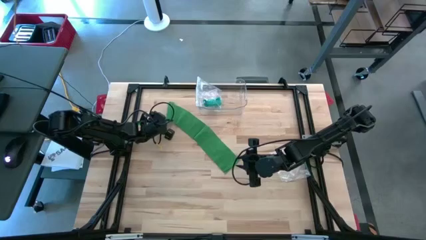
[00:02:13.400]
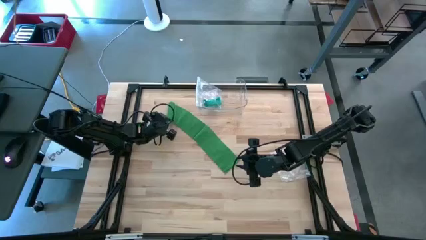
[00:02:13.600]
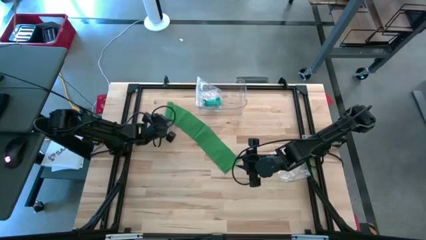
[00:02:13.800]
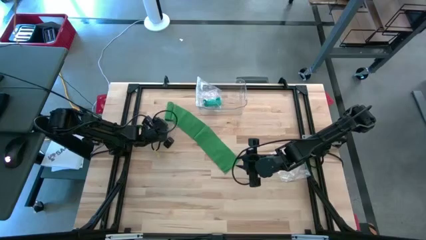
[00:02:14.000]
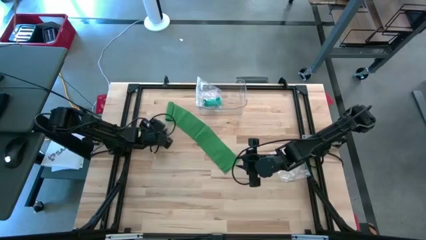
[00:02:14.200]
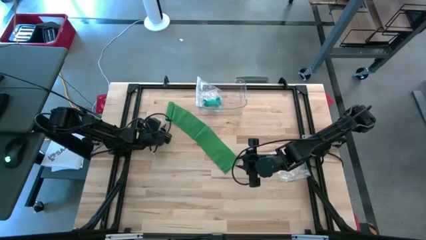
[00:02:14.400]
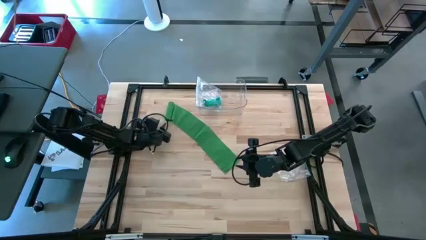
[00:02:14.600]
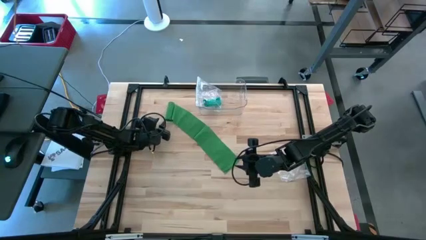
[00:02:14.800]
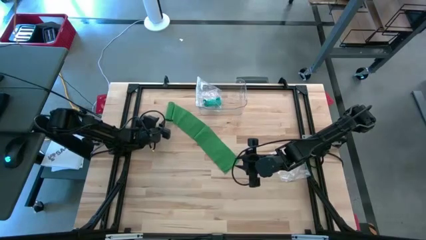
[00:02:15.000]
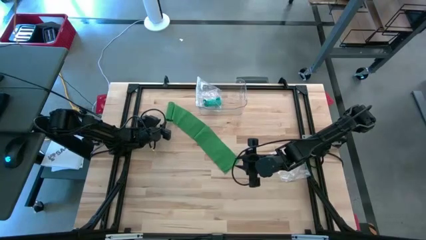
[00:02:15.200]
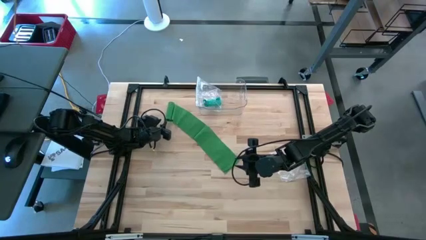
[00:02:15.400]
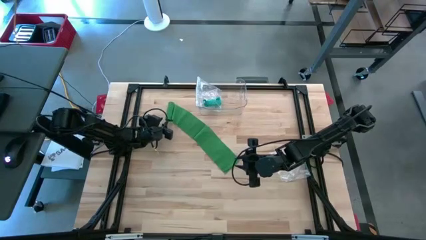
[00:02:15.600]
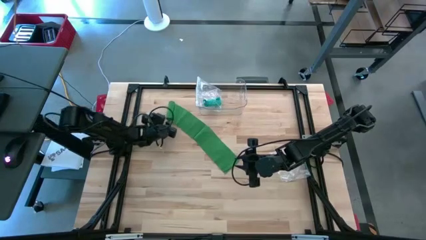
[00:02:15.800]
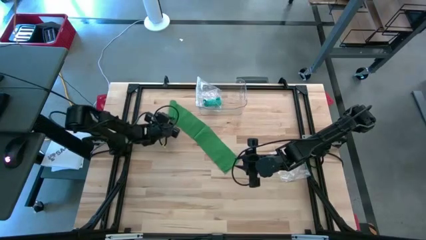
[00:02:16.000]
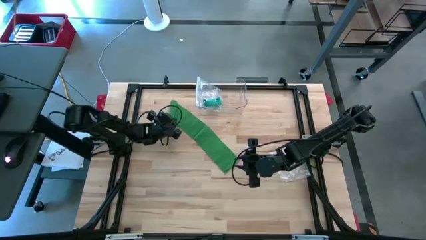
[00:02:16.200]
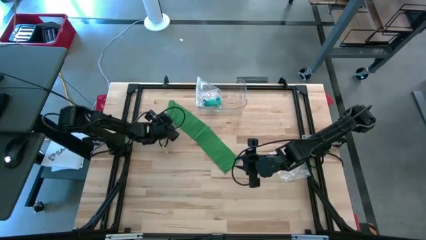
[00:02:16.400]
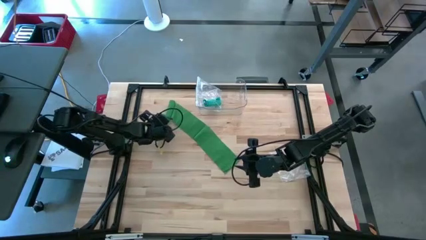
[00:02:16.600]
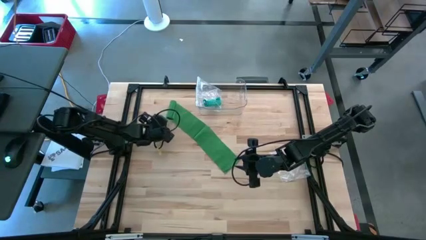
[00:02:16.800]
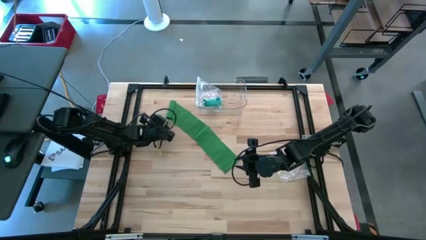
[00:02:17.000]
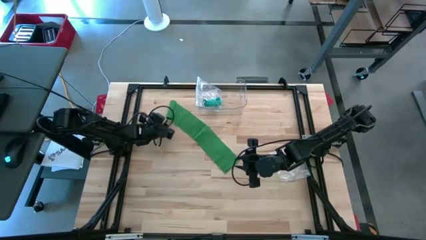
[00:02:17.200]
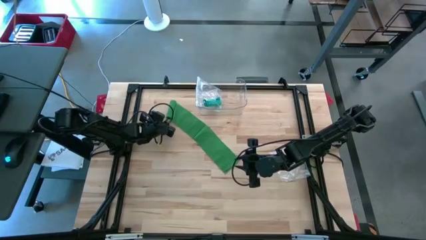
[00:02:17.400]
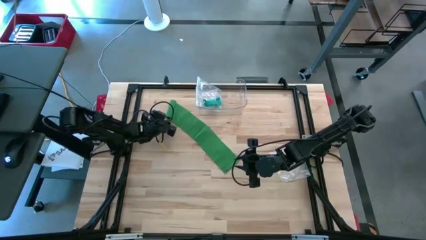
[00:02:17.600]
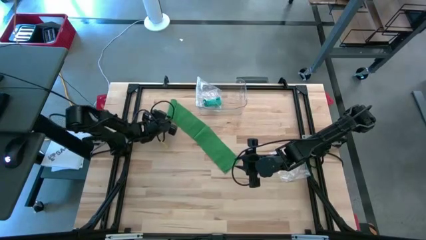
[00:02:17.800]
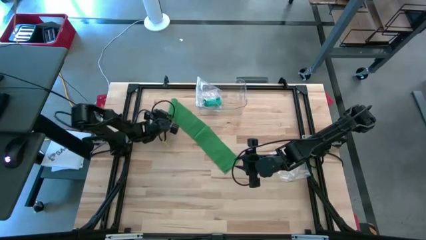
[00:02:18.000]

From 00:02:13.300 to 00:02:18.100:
Task: Roll bandage
Roll the green bandage

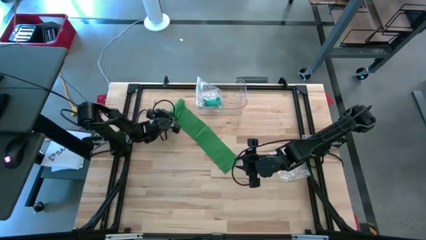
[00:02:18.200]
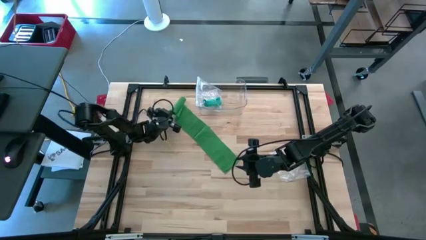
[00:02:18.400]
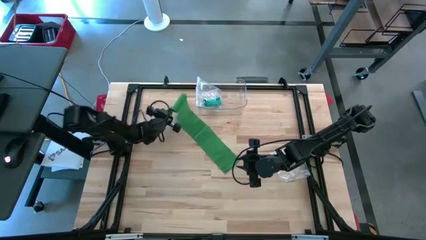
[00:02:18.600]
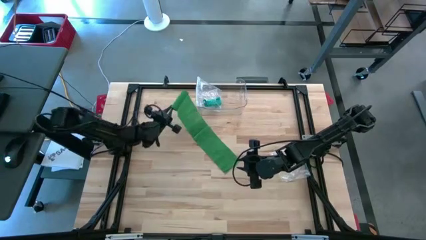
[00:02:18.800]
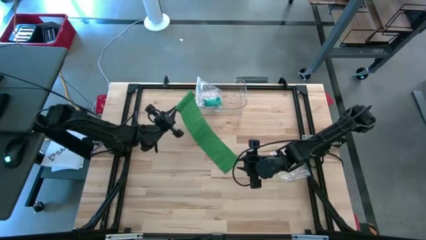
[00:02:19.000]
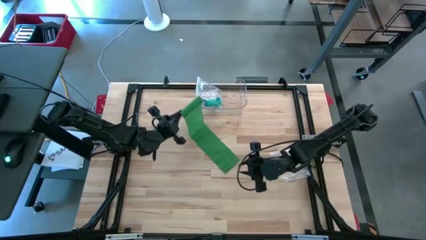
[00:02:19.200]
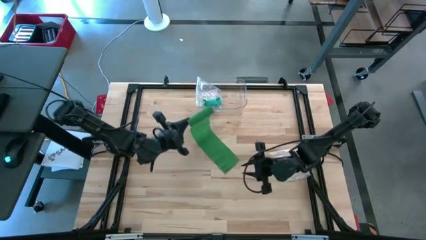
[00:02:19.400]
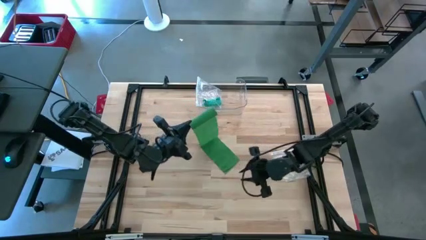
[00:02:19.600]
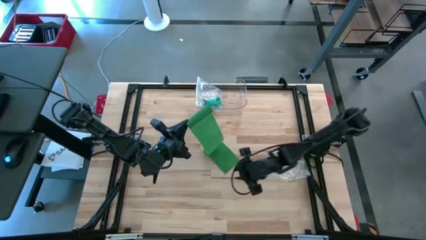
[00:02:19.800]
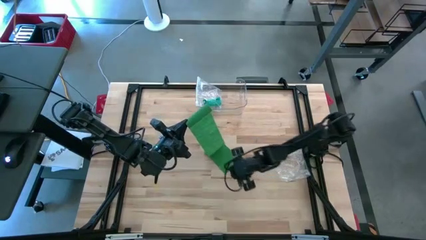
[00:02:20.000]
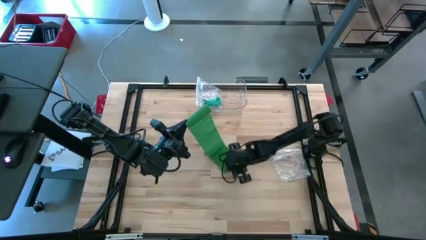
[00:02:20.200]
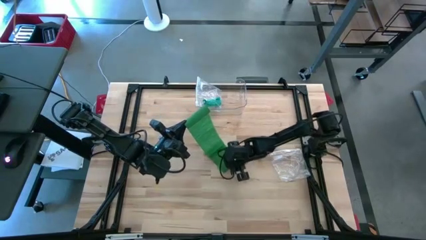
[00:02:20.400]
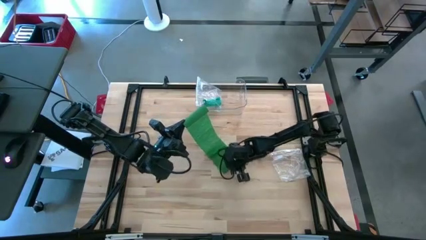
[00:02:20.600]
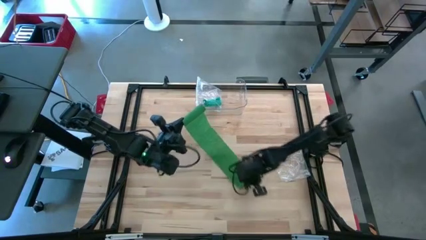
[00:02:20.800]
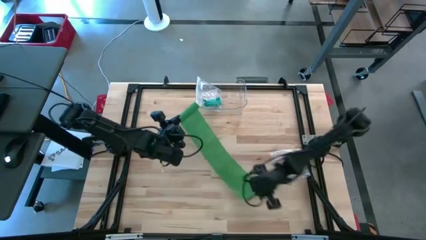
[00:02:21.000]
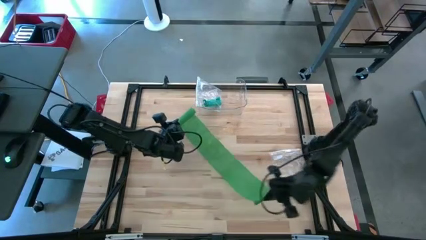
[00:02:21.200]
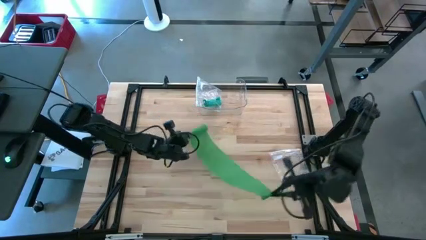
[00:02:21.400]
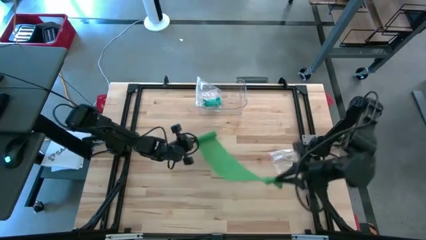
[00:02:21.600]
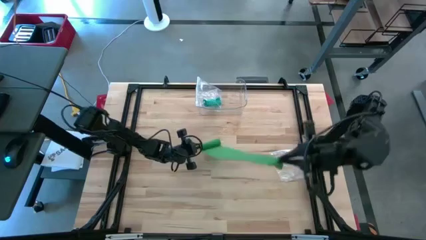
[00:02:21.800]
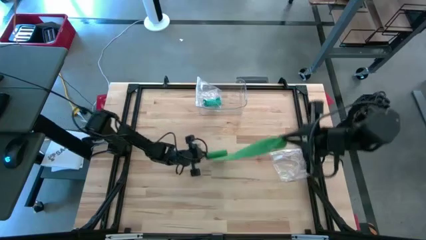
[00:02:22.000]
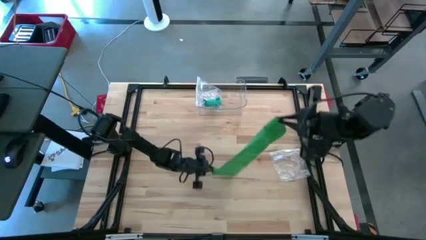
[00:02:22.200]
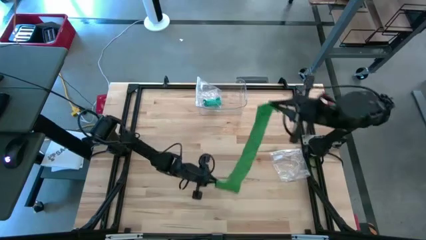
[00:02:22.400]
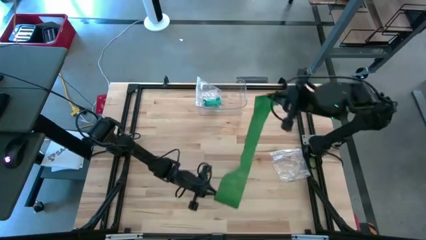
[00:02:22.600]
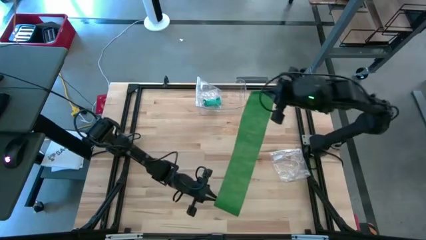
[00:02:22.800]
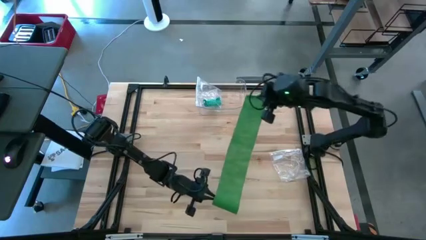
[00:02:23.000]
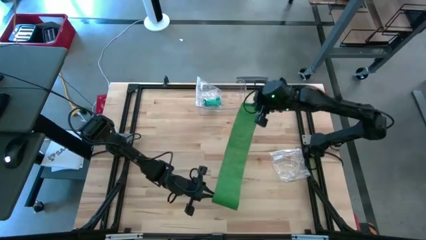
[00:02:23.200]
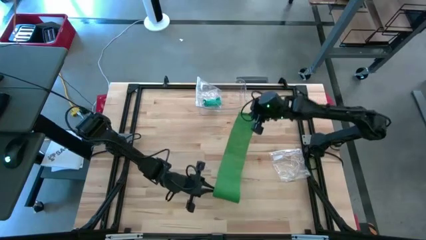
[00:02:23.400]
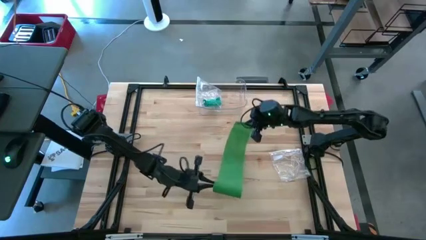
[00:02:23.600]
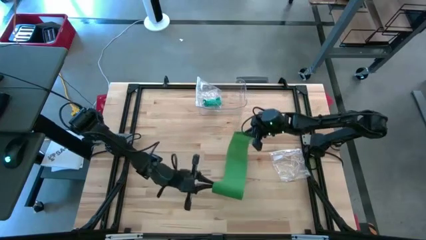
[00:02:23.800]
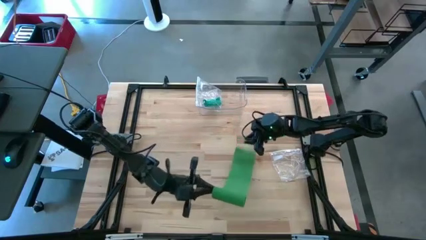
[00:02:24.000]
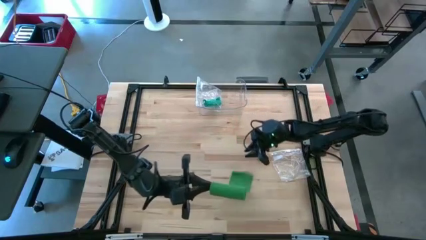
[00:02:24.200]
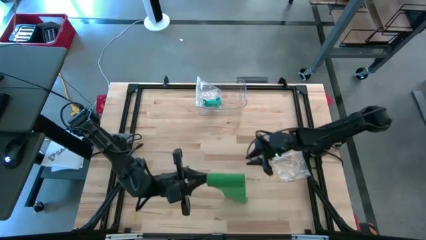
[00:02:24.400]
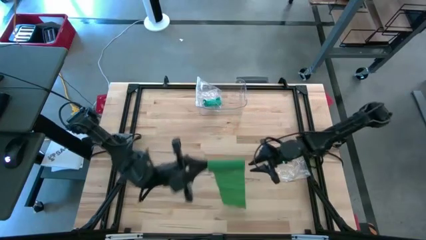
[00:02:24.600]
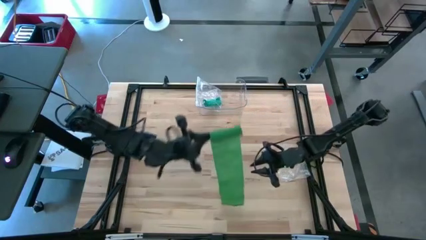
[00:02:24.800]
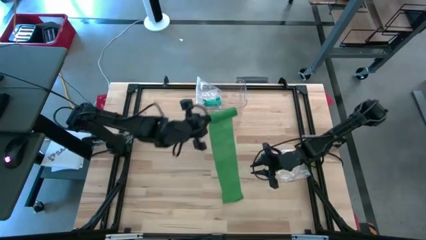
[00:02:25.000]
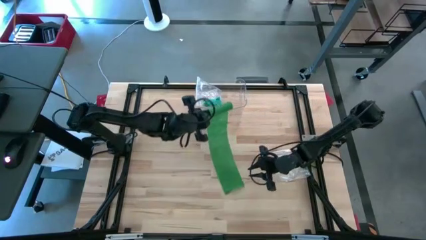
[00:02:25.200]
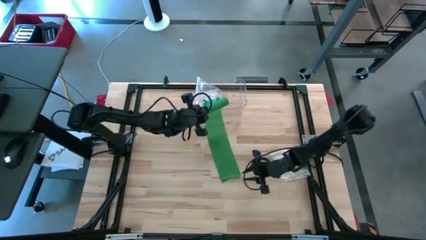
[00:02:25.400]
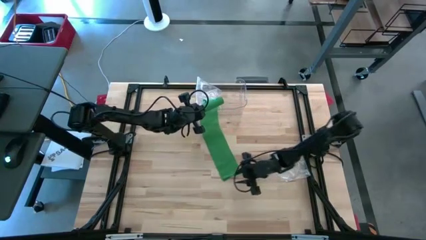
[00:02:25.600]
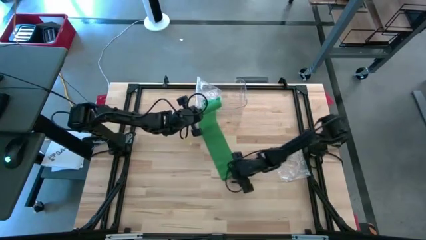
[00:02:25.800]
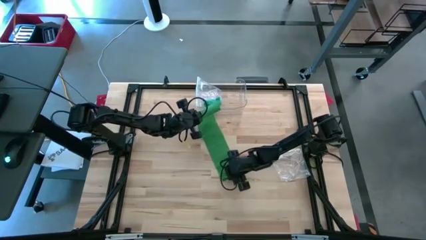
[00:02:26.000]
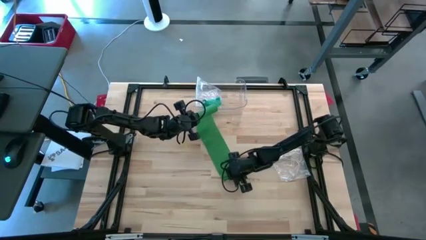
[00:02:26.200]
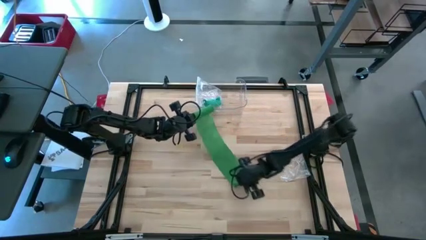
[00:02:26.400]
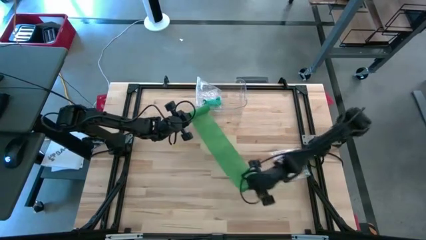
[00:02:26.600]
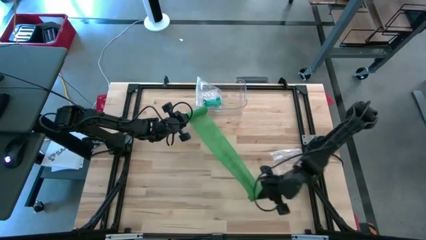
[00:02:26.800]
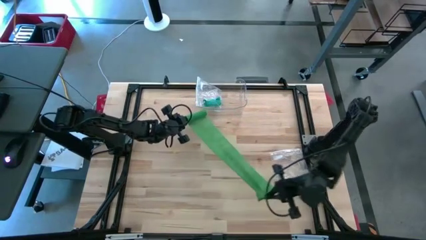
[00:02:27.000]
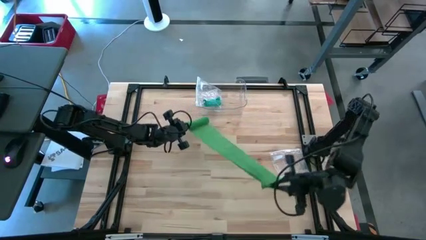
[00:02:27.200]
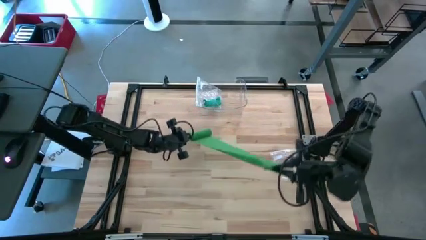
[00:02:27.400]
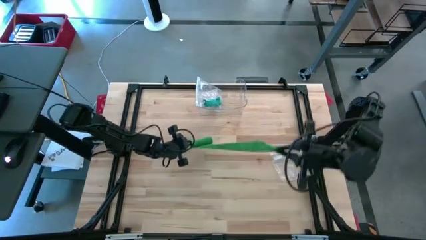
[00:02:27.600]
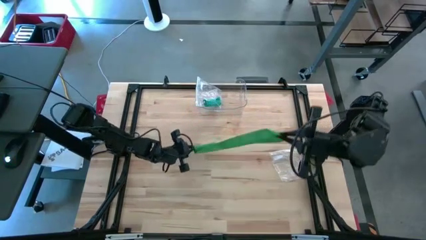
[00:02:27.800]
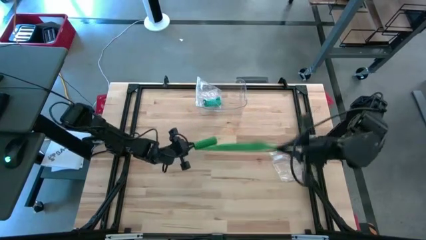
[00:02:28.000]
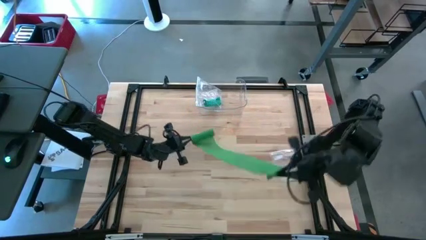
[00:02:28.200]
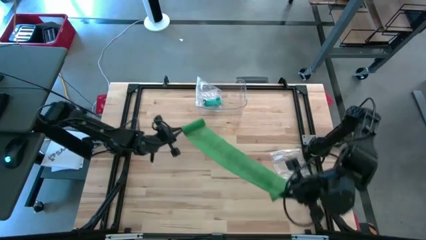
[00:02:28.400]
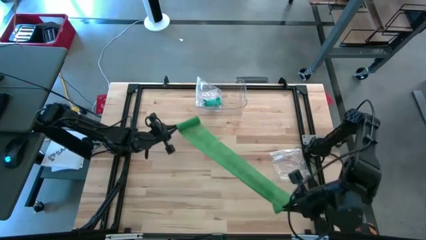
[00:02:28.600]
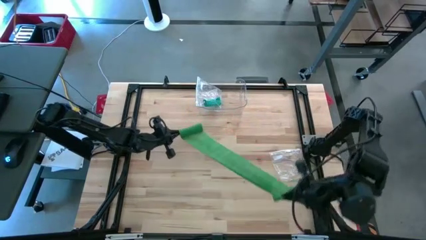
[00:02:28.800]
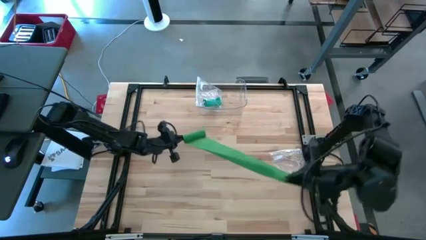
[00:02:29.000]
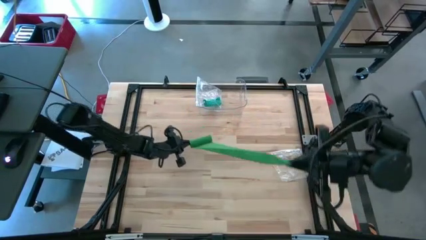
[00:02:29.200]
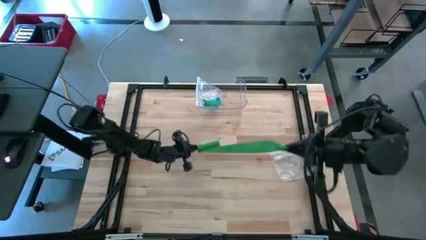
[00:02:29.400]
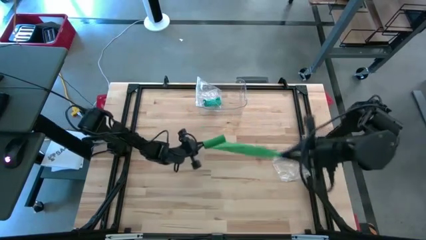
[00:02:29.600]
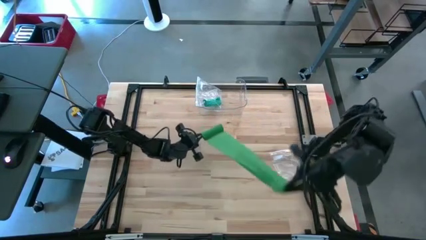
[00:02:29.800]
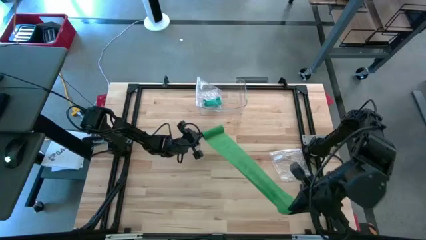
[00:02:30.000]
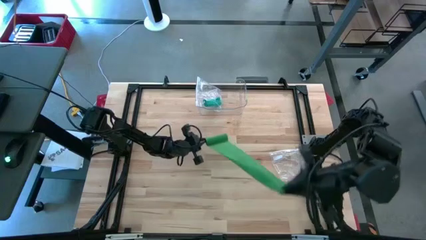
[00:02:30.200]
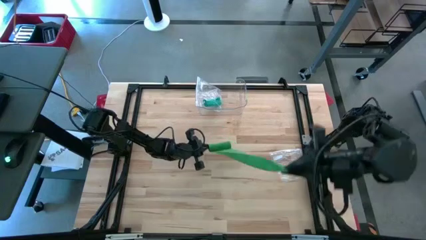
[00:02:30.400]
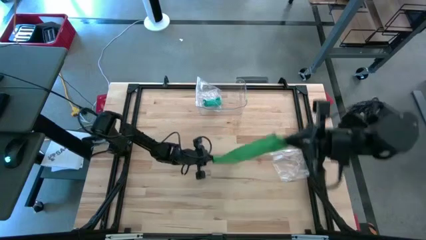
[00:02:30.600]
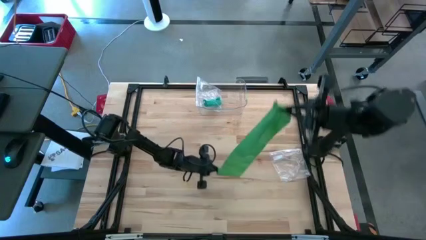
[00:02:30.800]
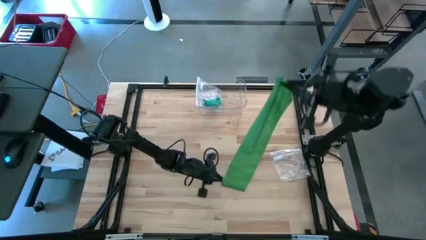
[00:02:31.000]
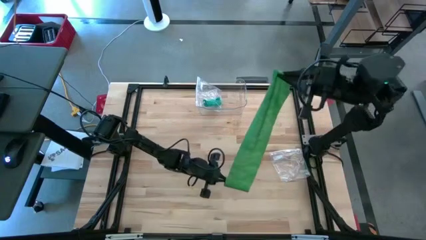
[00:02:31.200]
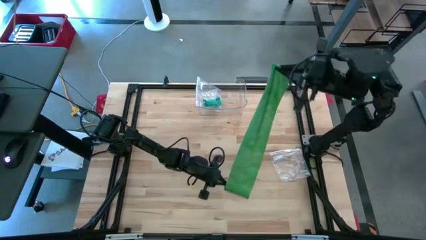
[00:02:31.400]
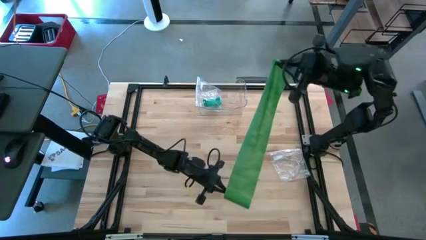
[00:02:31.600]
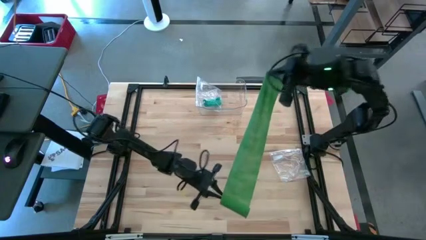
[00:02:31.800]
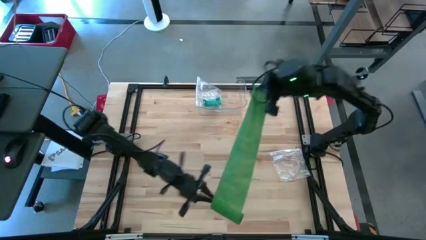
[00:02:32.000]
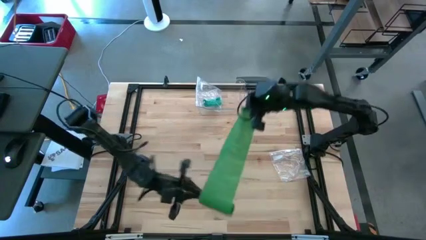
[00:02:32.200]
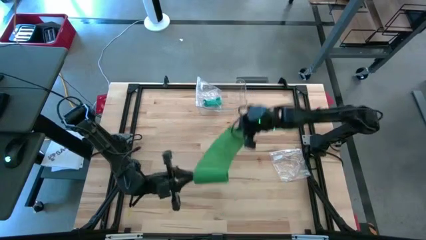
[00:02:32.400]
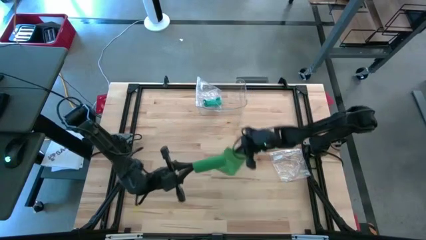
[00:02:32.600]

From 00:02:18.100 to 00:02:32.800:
Roll the green bandage
